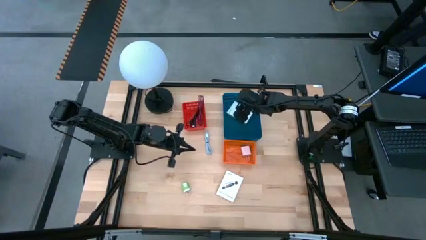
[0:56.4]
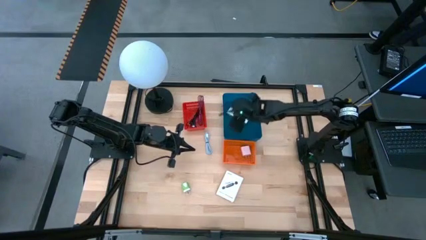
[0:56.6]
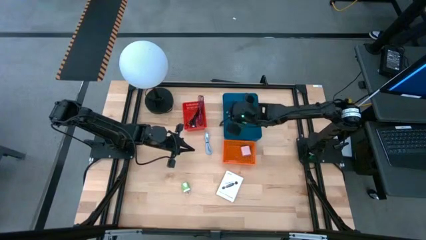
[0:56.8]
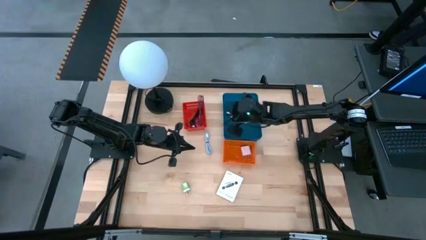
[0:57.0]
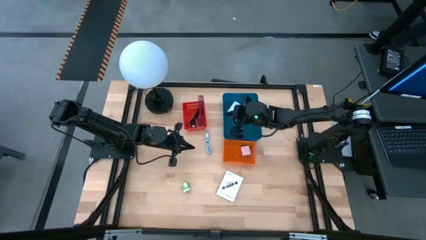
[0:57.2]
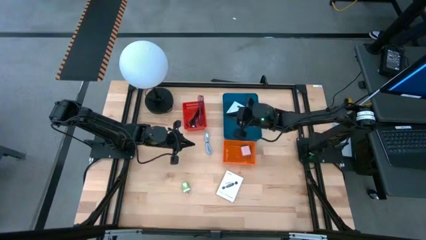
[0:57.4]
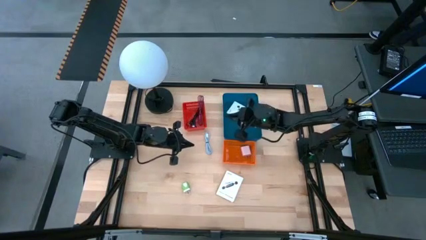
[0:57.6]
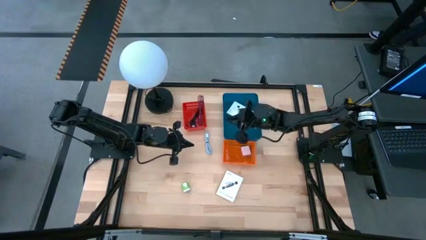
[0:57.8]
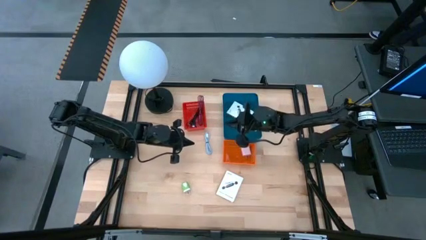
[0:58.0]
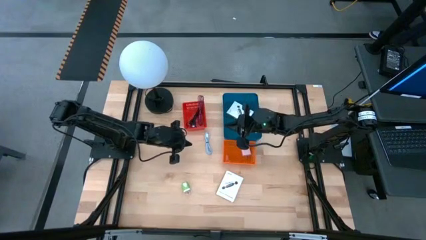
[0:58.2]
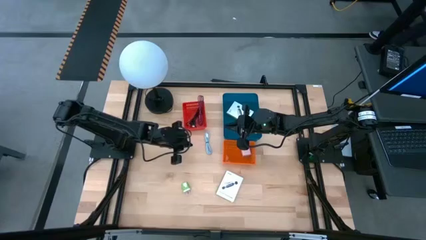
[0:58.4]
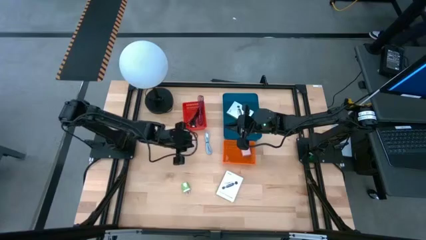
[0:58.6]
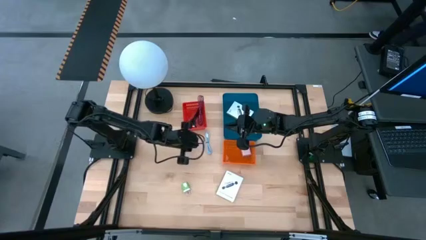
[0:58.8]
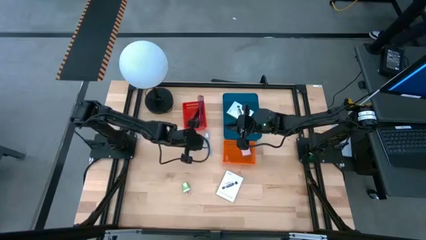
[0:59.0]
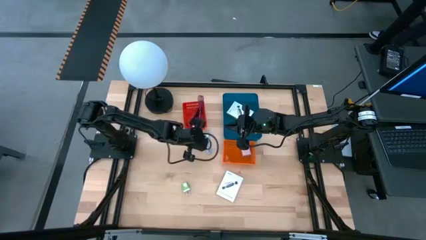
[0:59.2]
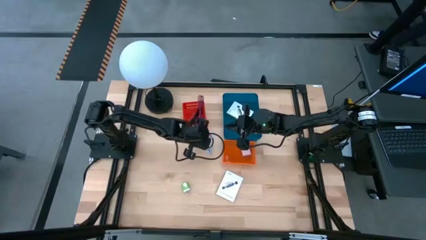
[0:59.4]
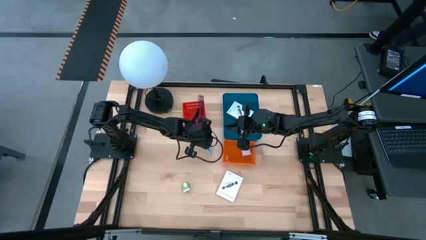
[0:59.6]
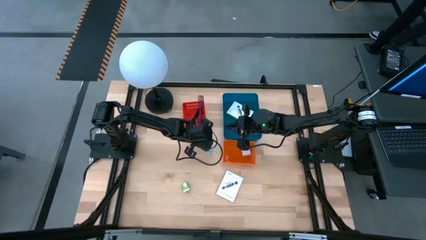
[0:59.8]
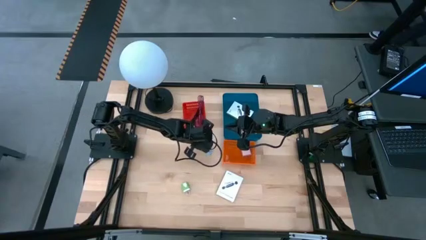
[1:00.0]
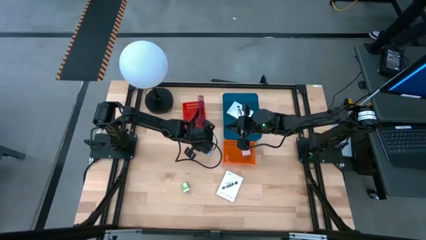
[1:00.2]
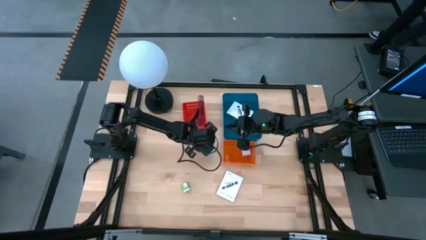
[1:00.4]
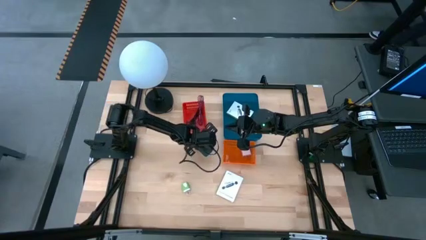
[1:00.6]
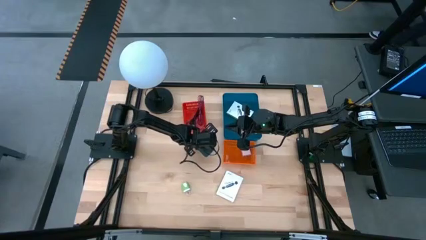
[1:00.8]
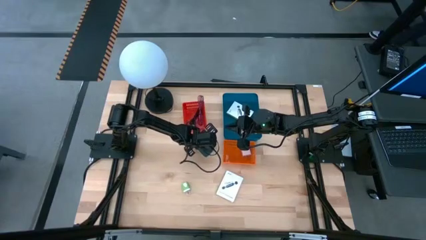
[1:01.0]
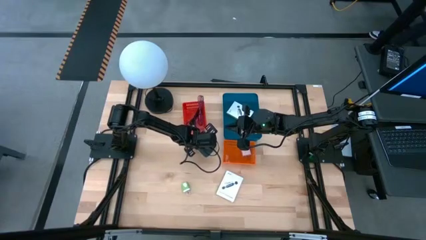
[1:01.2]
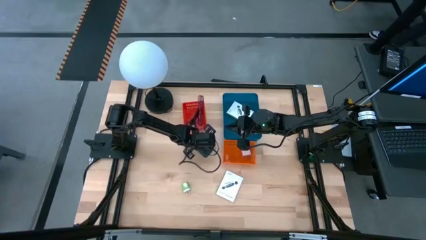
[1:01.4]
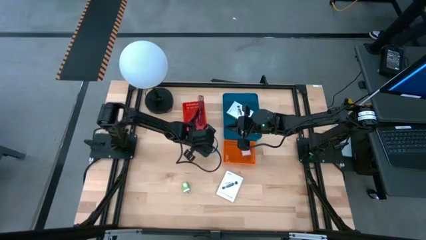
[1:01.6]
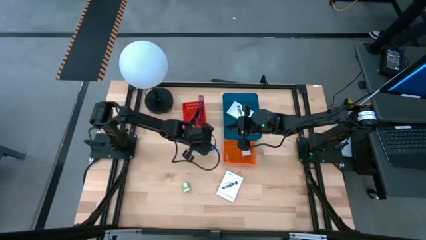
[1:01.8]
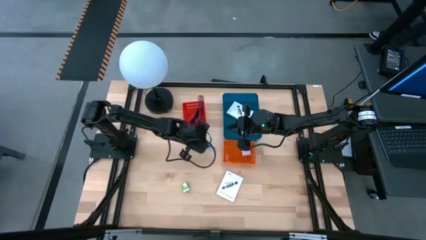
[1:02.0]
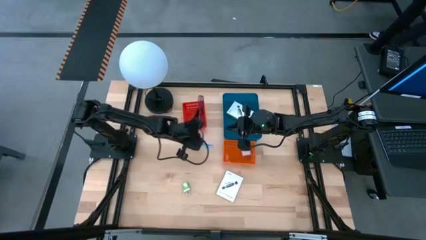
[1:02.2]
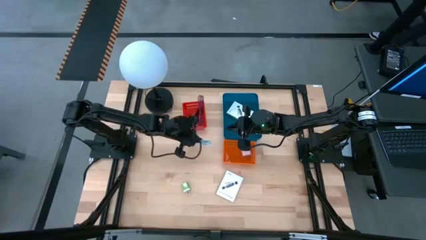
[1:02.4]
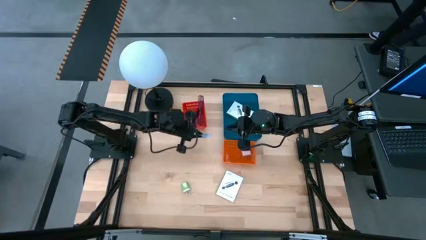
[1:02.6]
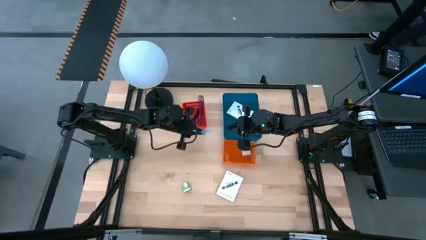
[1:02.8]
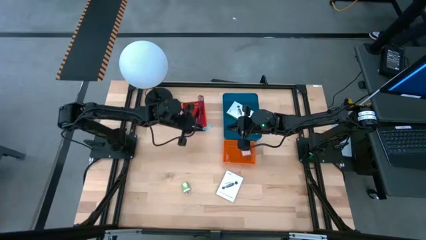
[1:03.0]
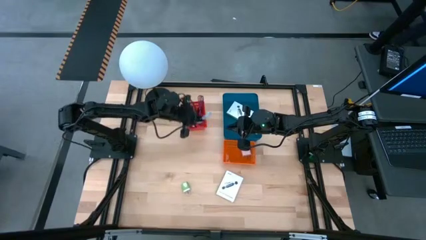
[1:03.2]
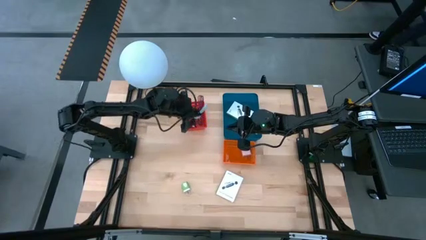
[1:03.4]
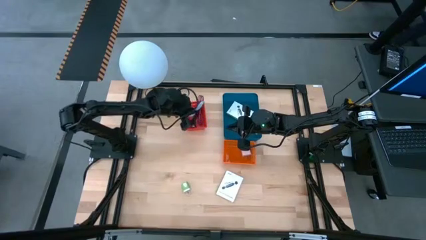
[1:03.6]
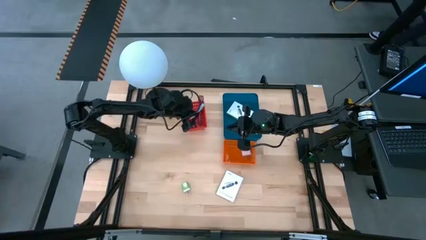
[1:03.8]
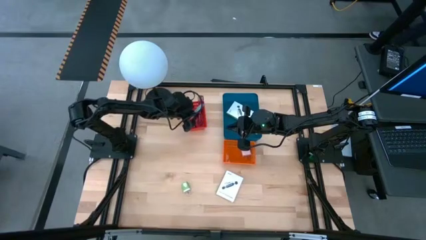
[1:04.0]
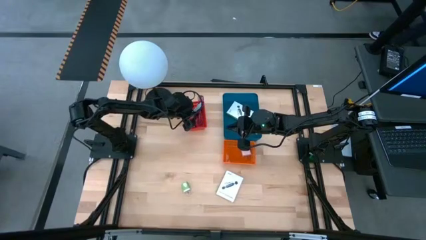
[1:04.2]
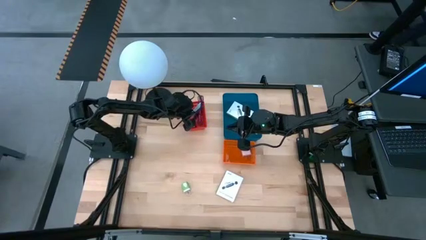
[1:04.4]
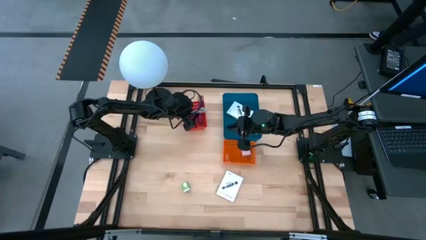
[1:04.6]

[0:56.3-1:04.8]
Task: Pick and place items into bin
Put the light blue charger cable into the red bin

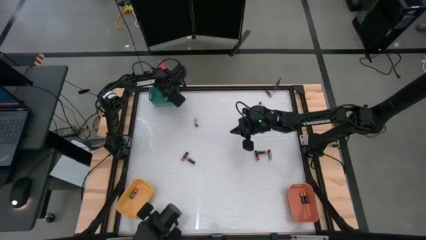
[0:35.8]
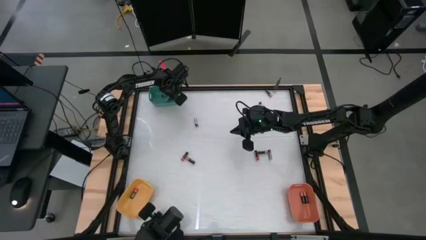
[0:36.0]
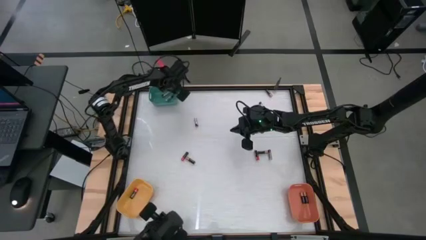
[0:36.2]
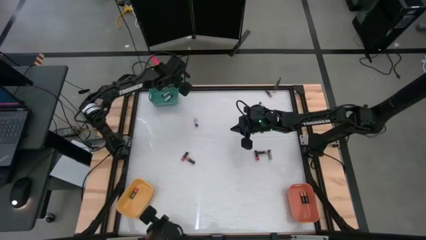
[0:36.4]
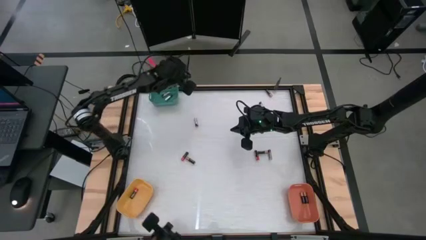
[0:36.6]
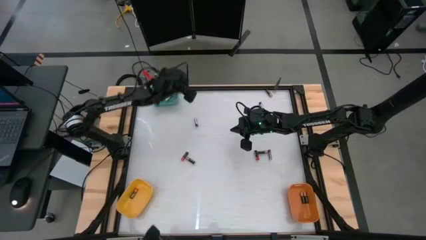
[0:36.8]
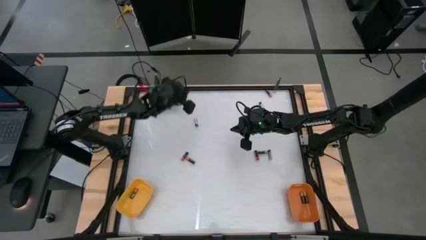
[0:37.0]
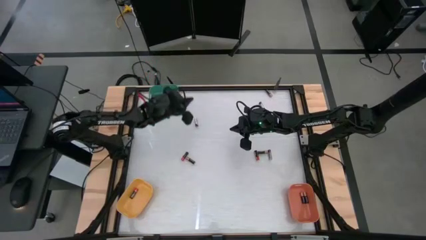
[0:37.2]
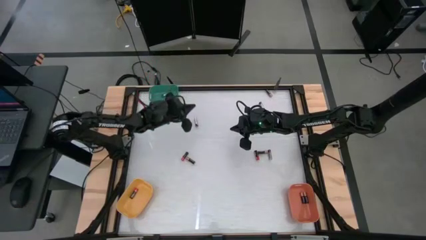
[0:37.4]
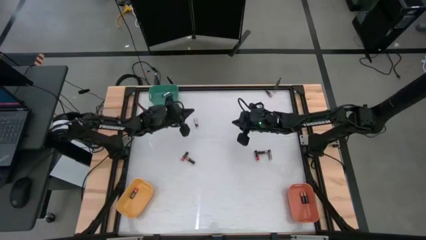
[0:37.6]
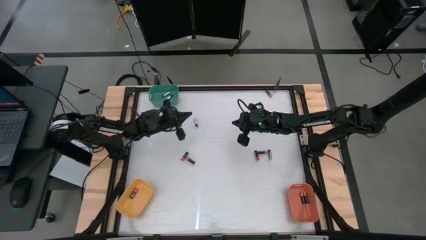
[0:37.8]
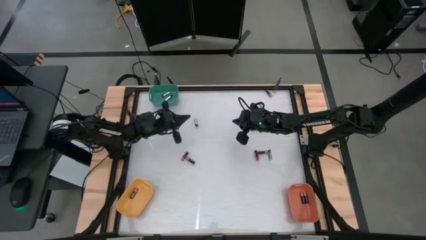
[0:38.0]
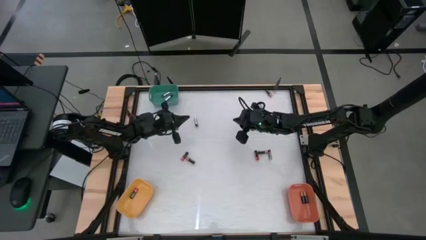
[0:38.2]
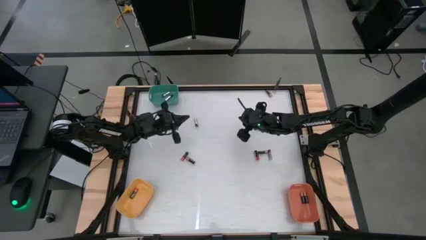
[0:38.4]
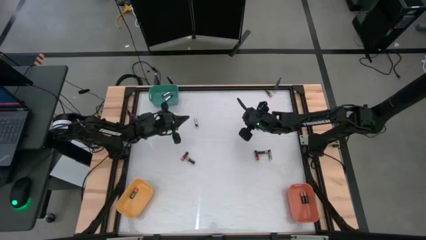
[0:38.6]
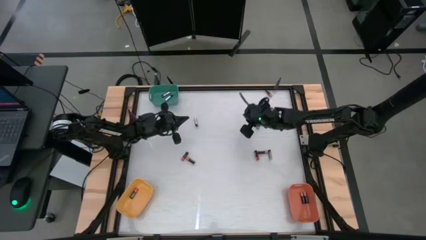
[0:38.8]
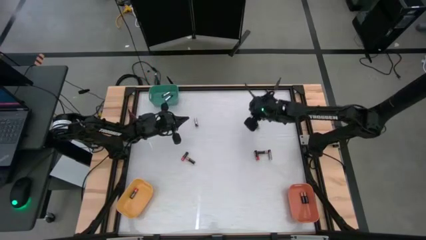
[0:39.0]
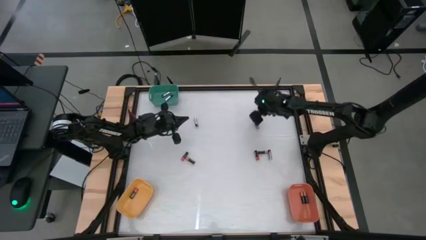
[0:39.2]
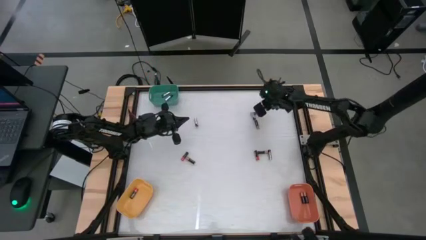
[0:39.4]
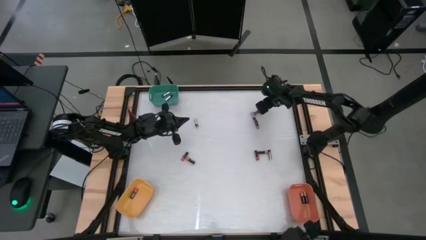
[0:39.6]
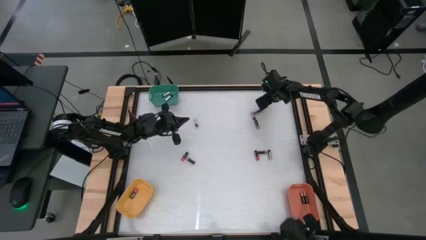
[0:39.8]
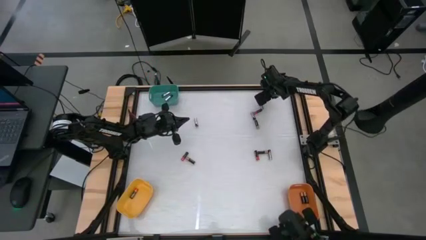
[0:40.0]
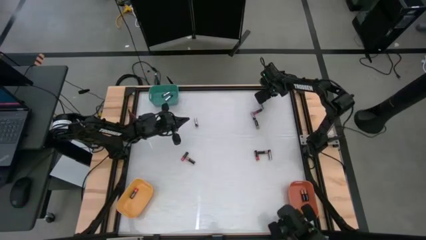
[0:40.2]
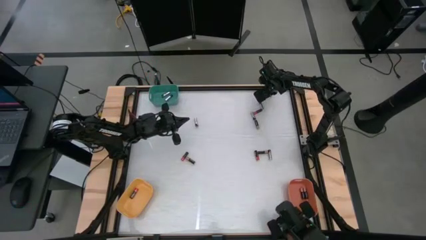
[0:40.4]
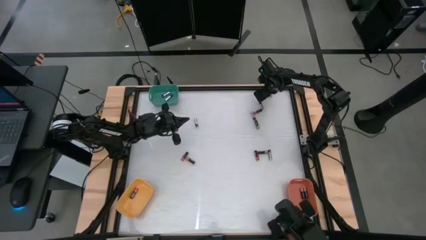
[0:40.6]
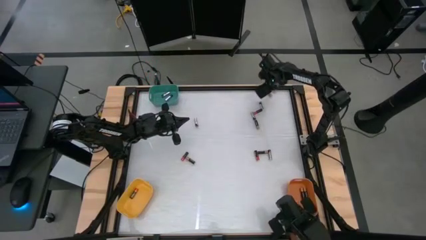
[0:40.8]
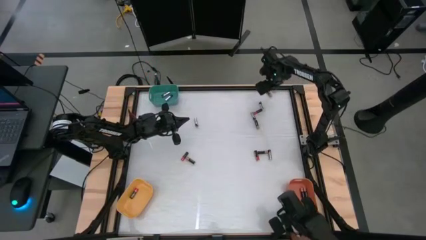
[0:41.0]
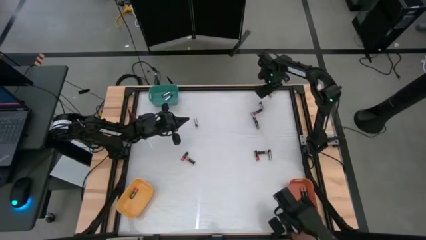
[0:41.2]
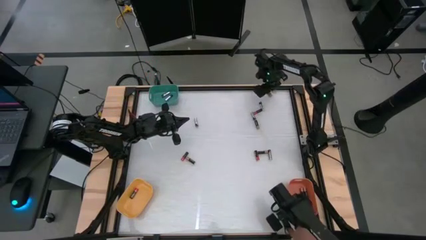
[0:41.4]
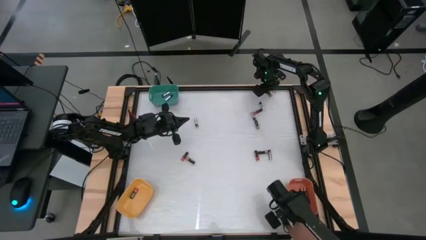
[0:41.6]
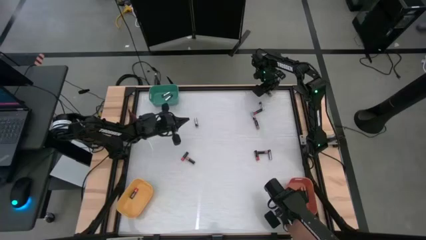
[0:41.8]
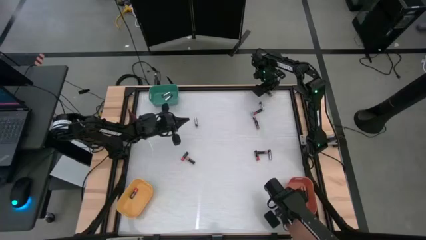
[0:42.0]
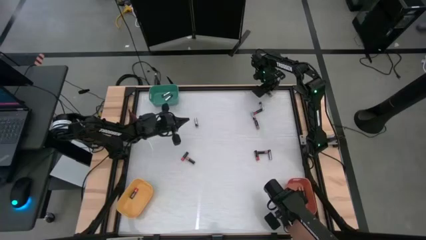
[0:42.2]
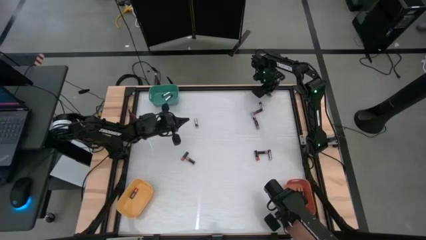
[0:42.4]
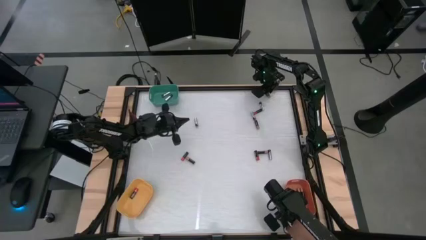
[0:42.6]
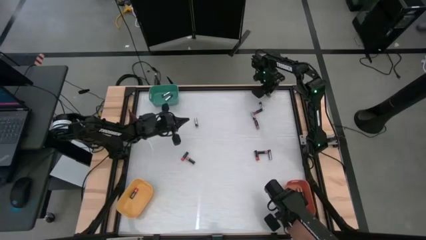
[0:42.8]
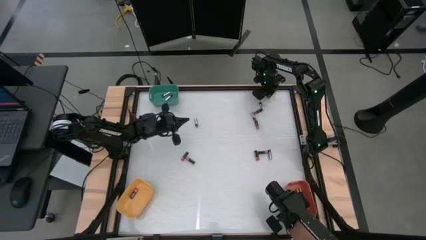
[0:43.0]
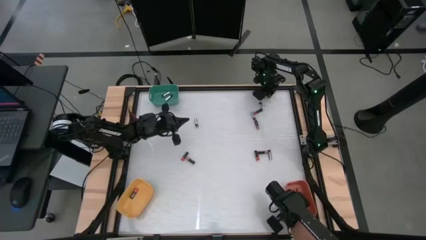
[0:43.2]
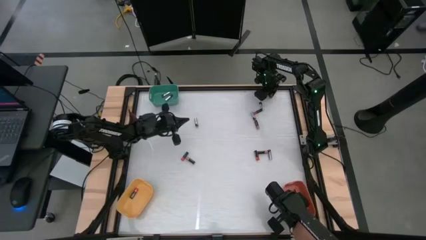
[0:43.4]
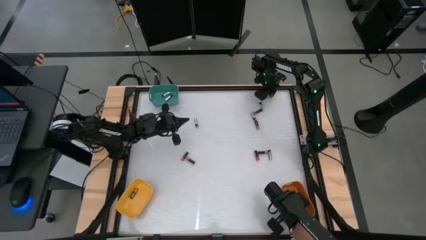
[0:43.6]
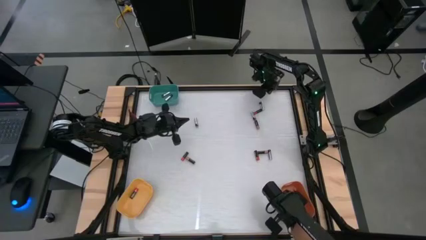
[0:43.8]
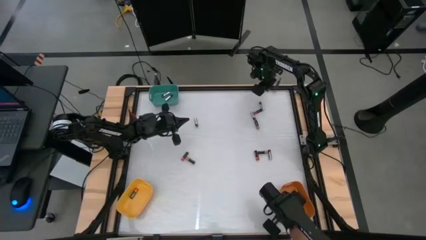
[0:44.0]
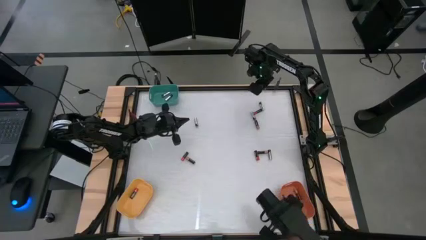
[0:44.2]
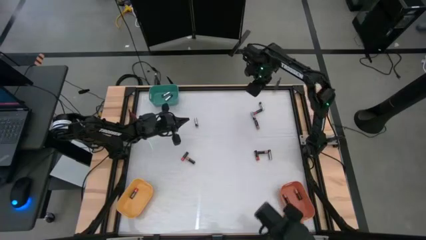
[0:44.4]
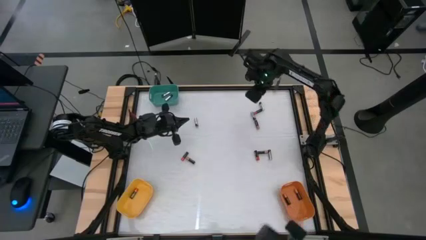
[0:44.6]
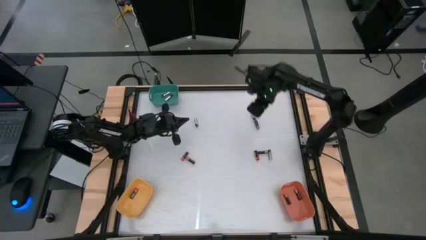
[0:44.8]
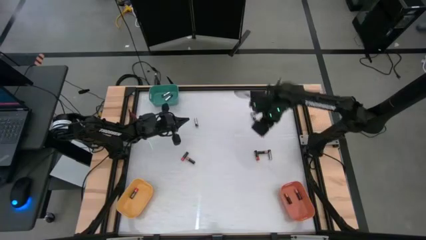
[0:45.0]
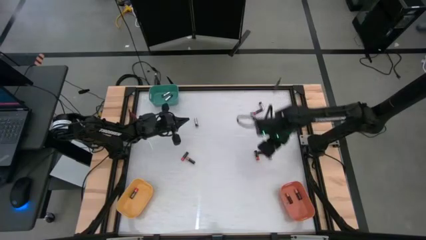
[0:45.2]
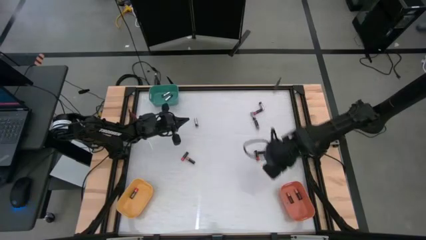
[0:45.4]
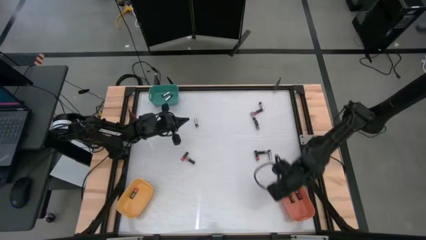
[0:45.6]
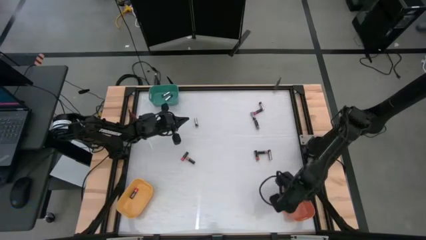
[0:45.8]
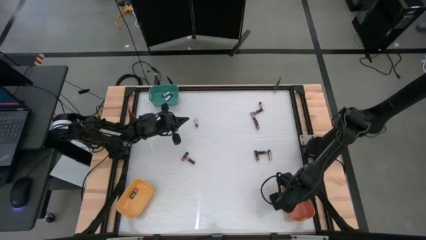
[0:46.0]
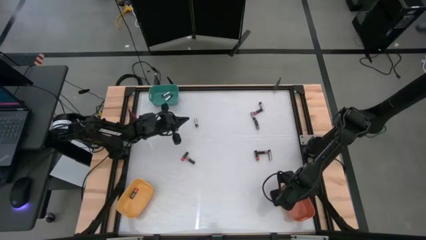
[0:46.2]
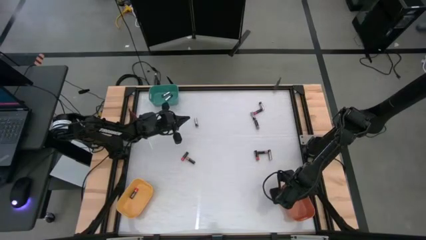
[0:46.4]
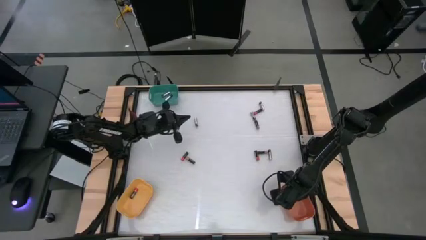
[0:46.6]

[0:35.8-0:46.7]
Task: Sort batteries
Put the top right gold battery into the orange bin
